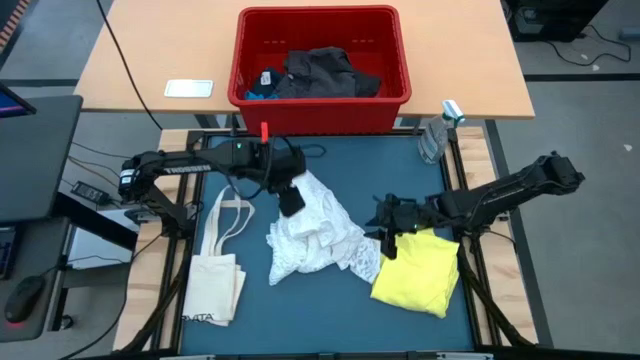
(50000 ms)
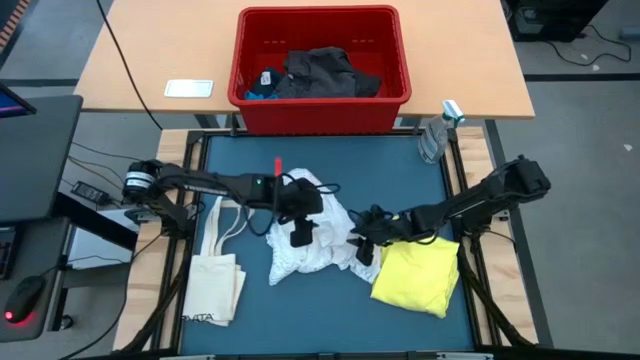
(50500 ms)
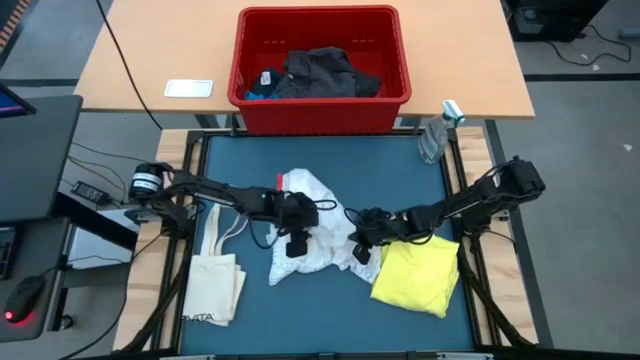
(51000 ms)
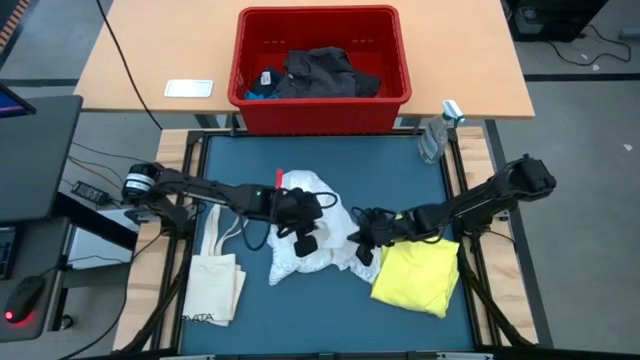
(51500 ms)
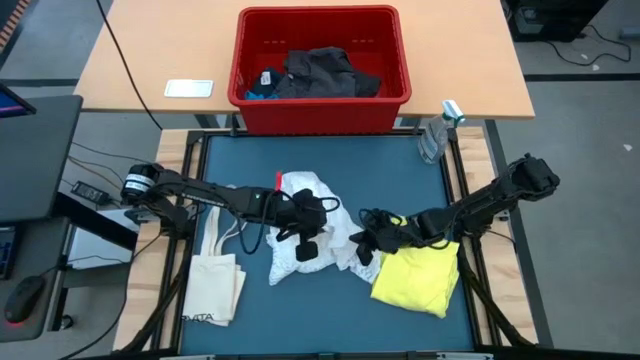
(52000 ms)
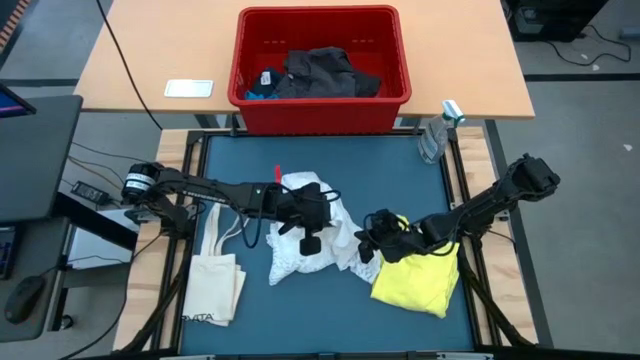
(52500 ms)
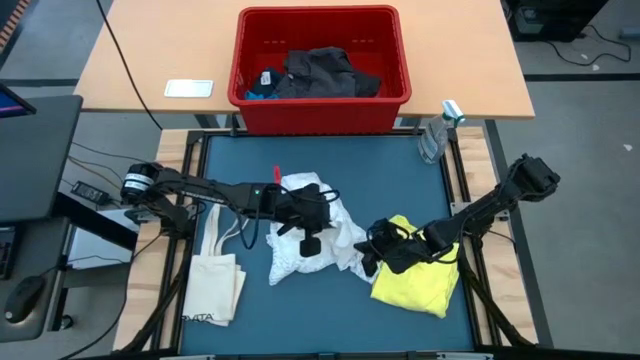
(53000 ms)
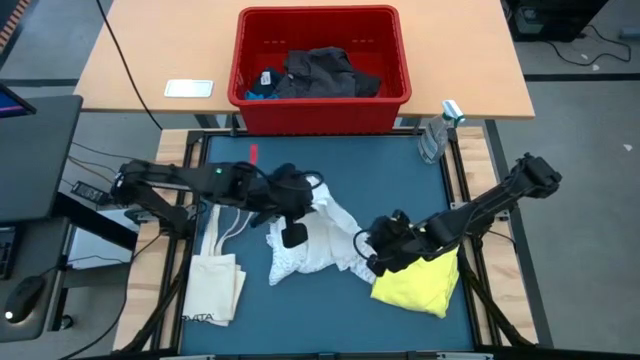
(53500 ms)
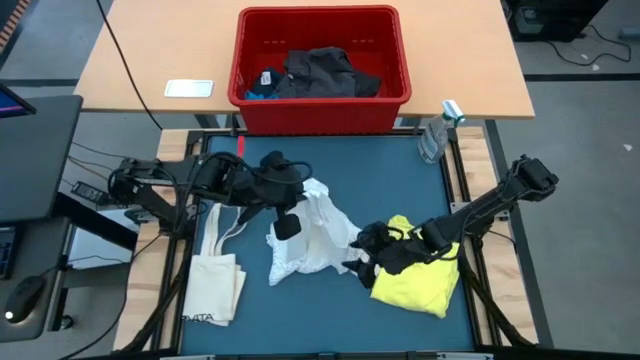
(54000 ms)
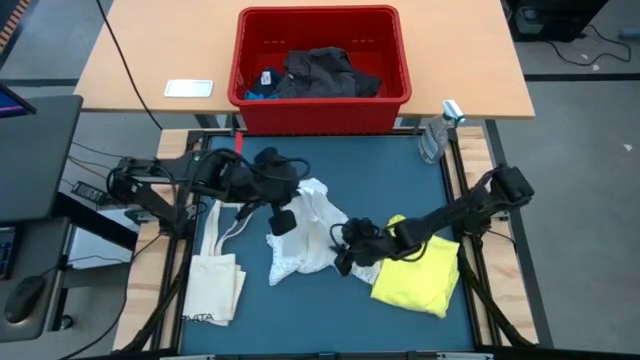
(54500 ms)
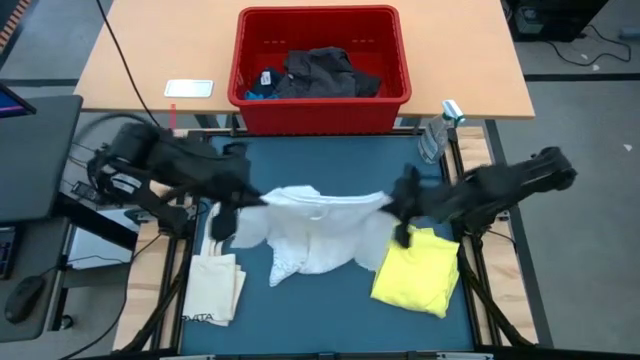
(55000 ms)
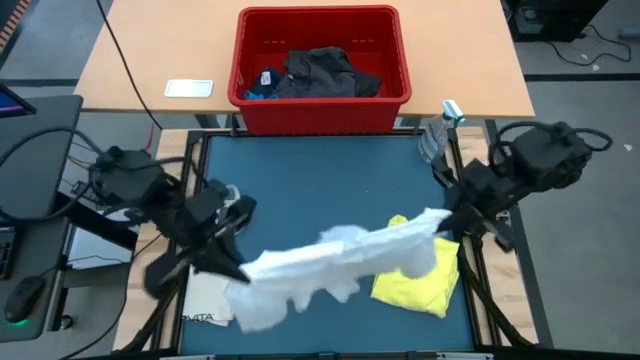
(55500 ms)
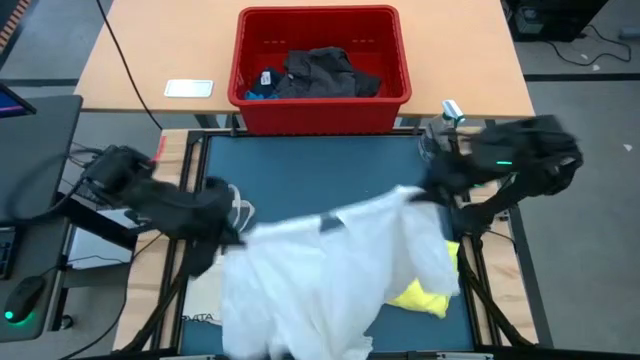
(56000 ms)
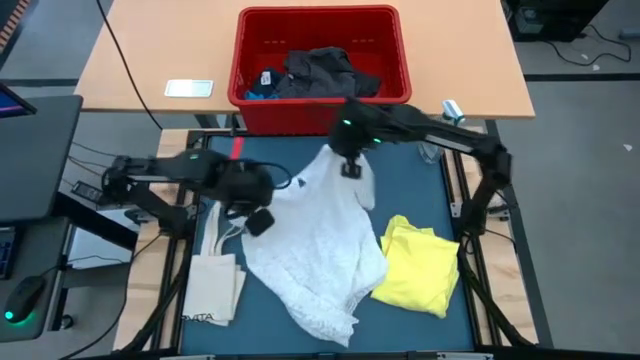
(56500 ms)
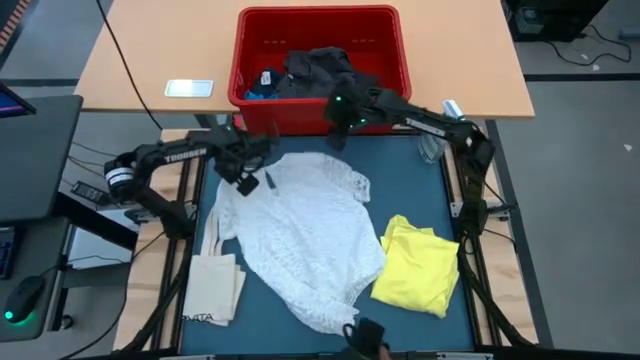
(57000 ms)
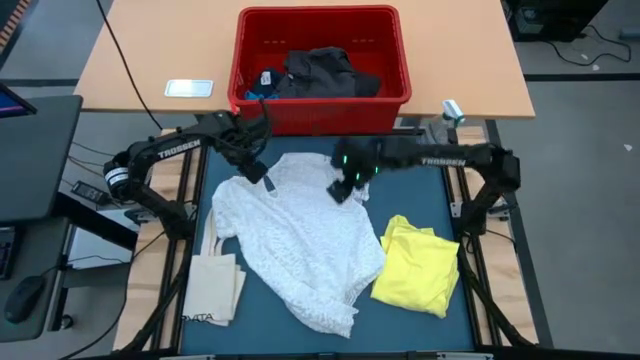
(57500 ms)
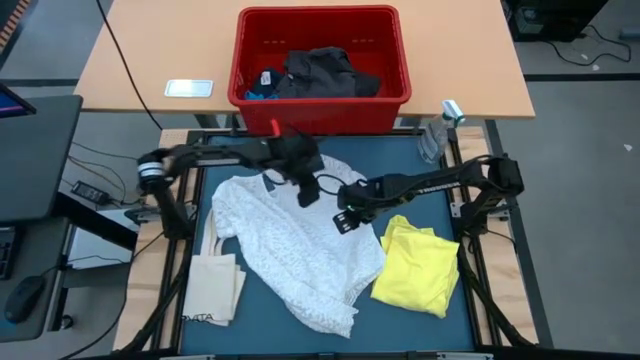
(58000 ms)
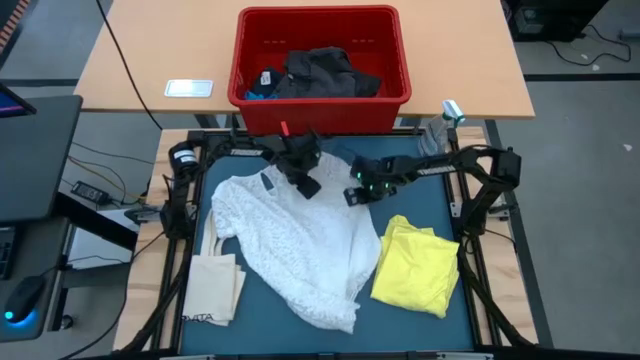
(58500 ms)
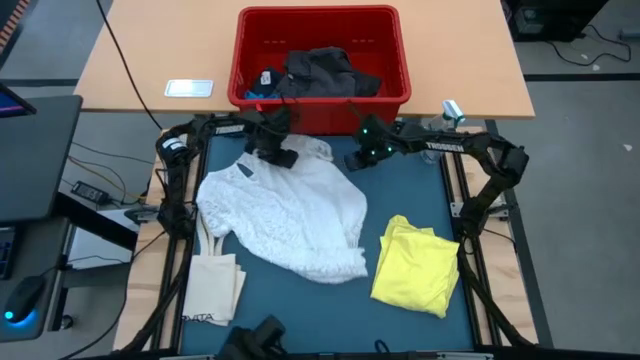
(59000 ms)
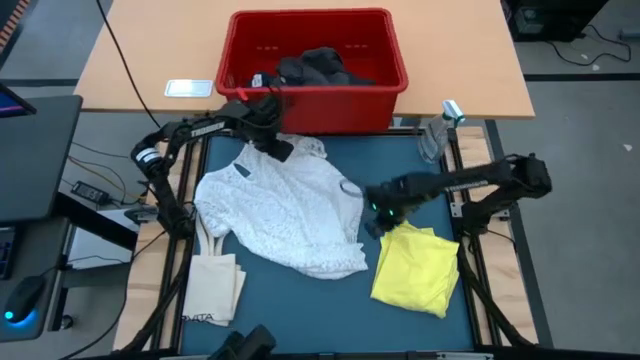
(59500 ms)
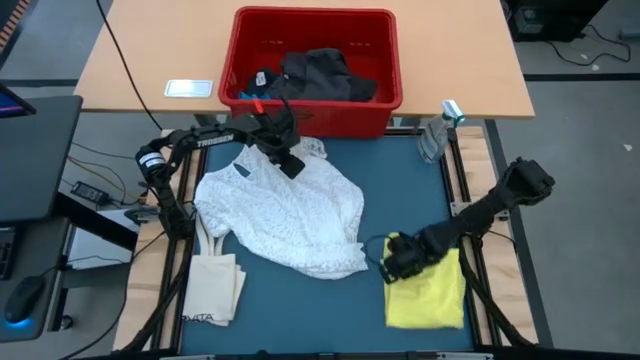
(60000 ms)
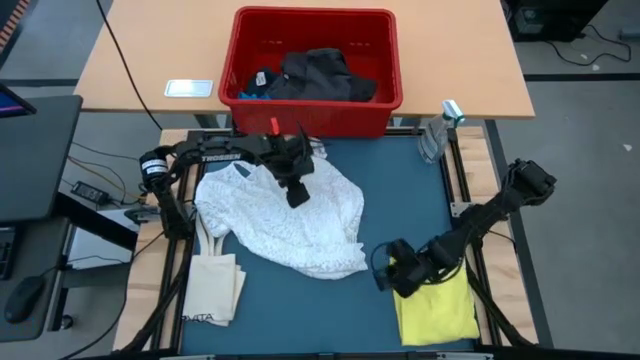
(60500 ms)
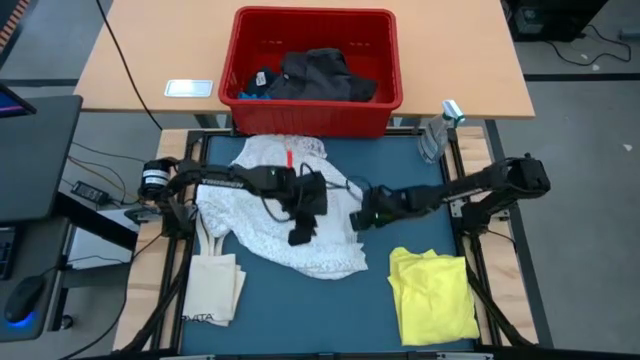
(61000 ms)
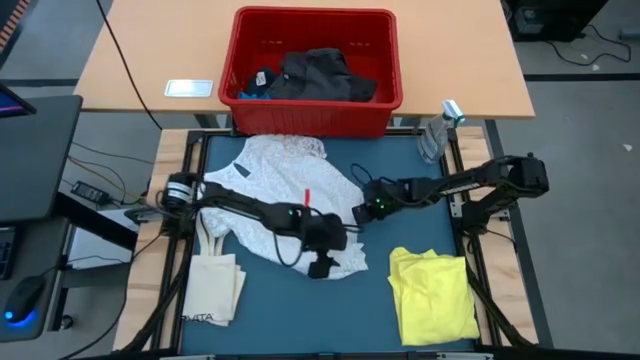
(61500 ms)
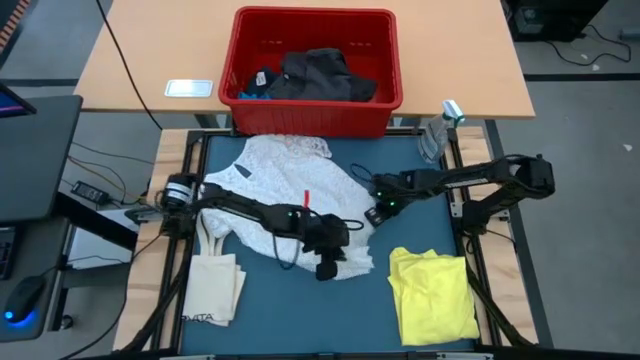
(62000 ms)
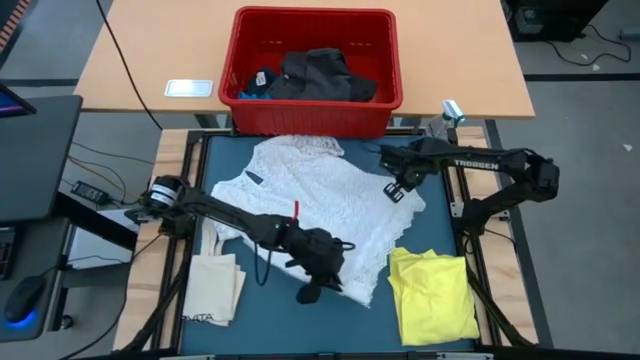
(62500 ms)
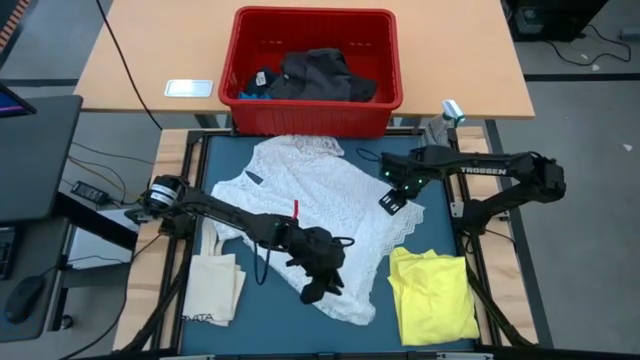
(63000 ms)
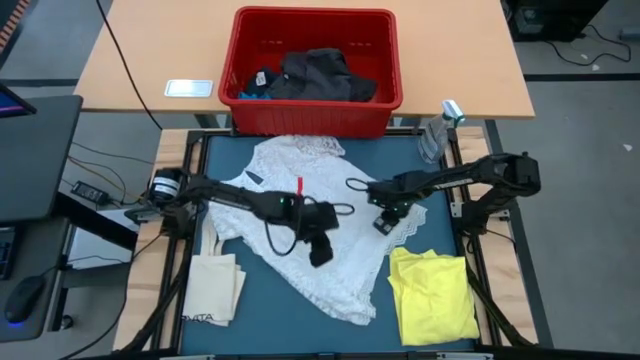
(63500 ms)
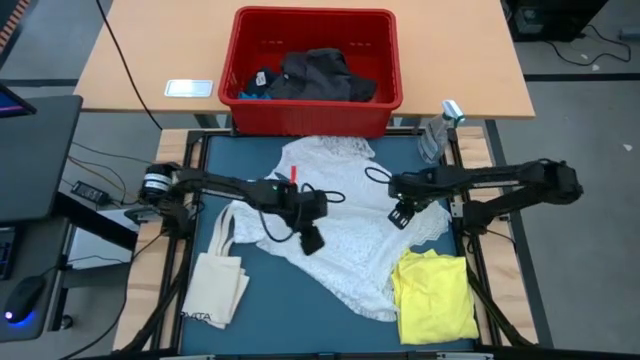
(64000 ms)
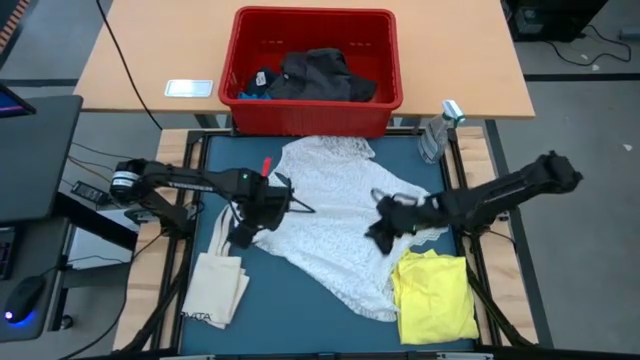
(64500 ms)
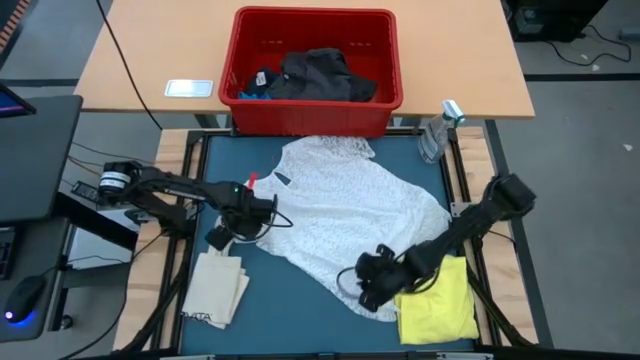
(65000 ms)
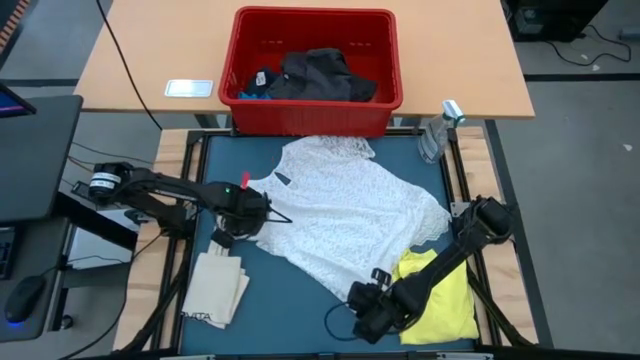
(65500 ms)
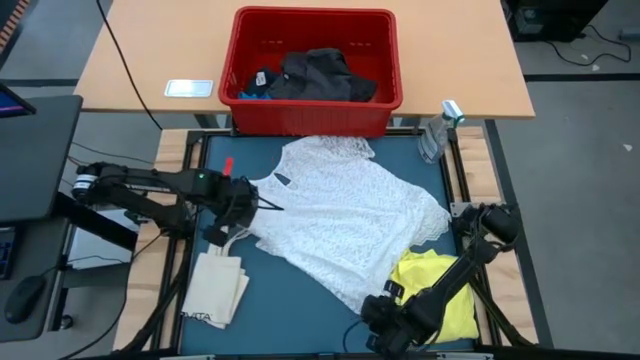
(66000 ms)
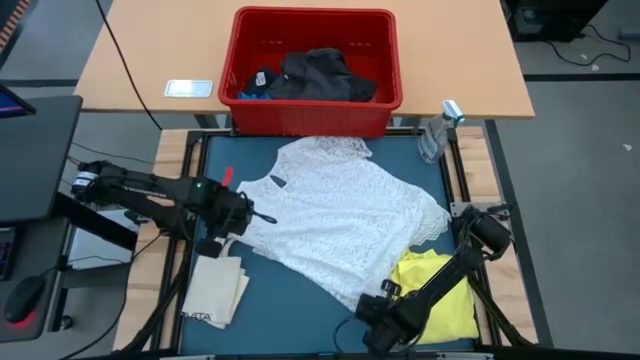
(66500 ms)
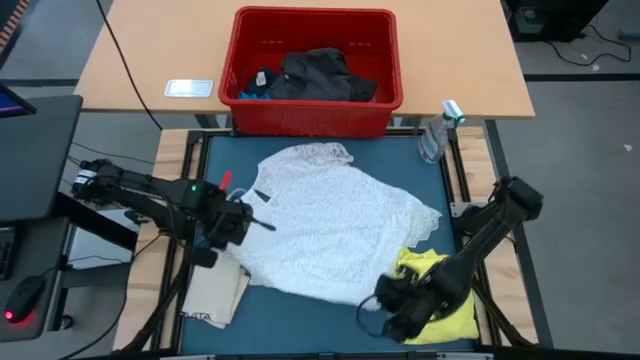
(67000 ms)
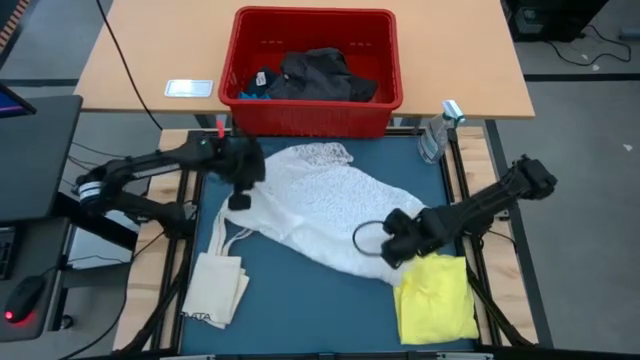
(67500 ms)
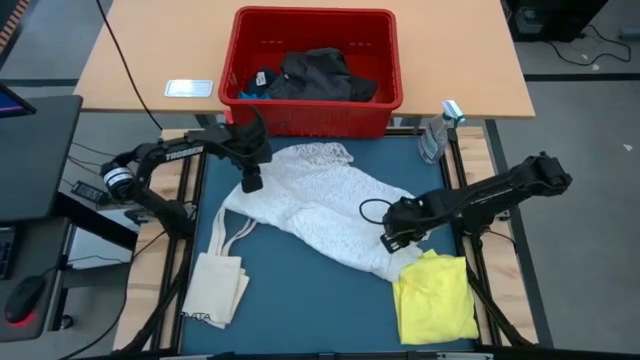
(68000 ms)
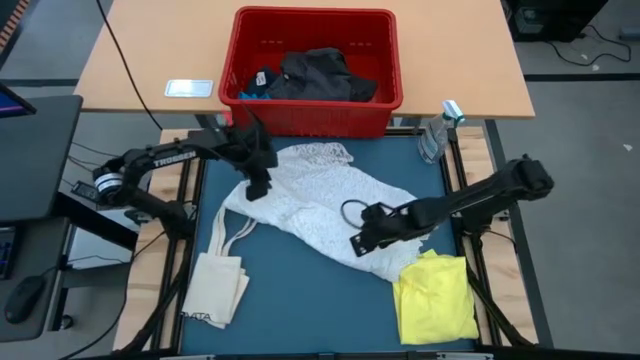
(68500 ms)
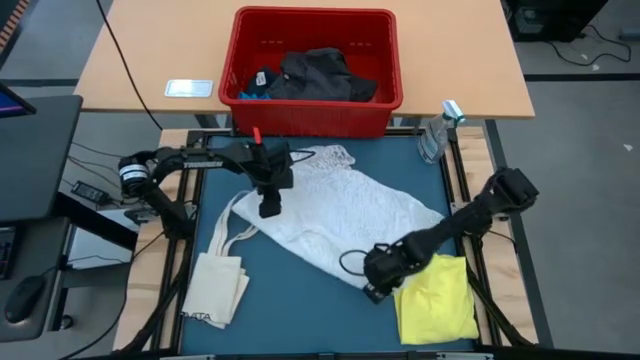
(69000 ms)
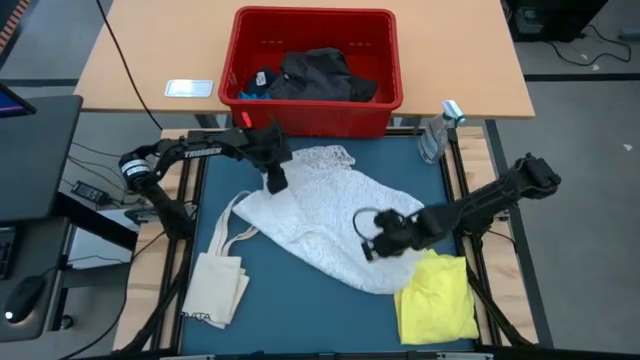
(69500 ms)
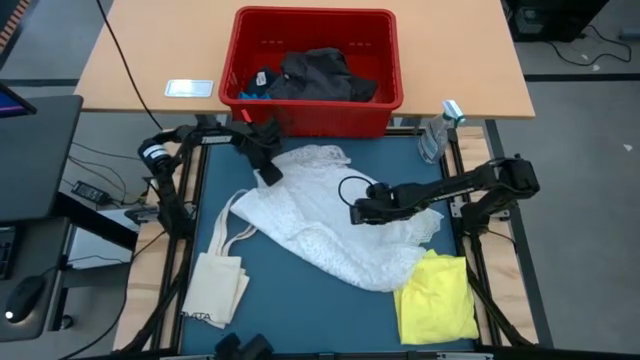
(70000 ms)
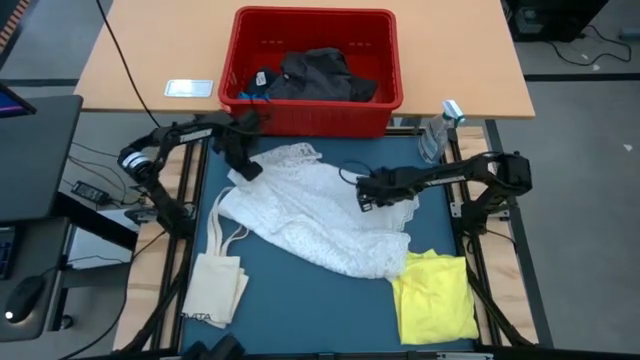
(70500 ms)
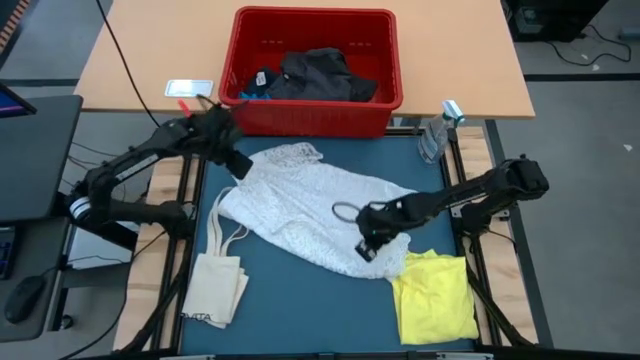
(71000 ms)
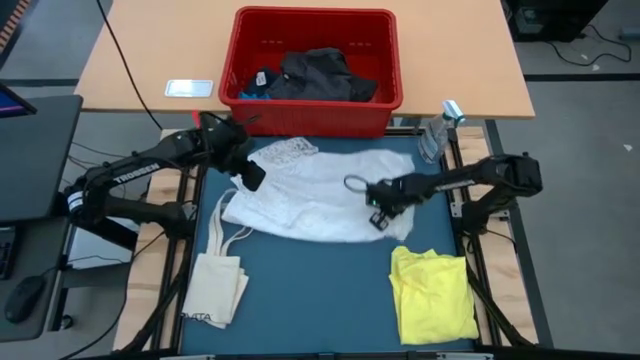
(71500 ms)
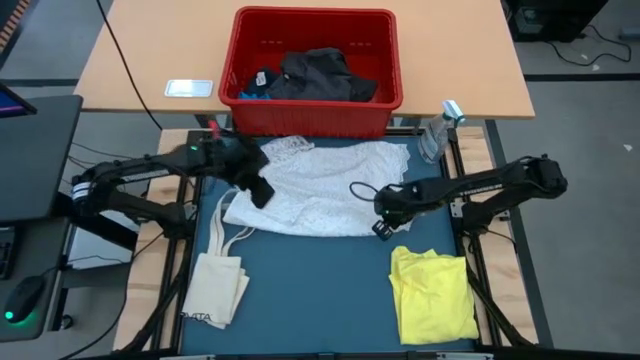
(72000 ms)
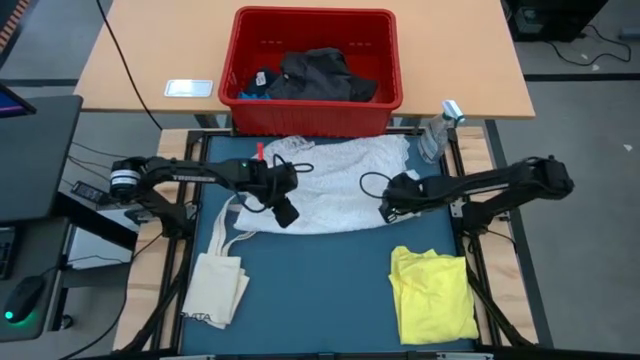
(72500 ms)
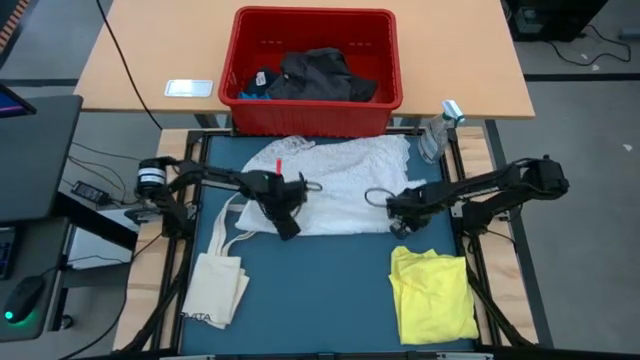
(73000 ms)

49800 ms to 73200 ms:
Task: Fold laundry
Fold the white cloth
